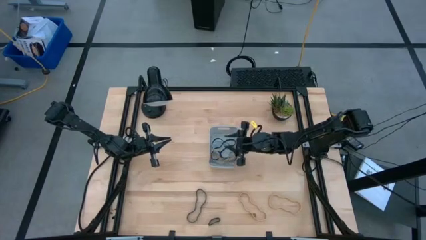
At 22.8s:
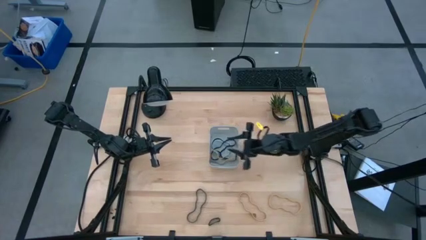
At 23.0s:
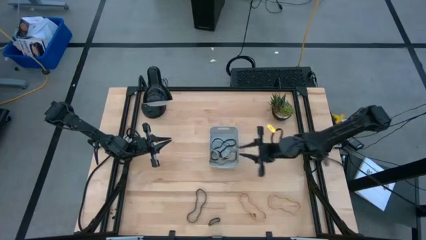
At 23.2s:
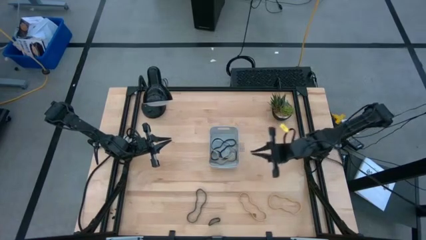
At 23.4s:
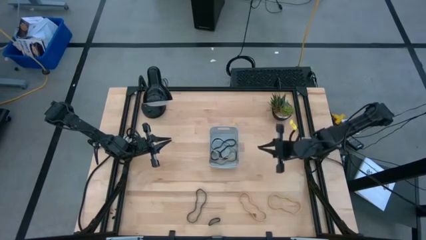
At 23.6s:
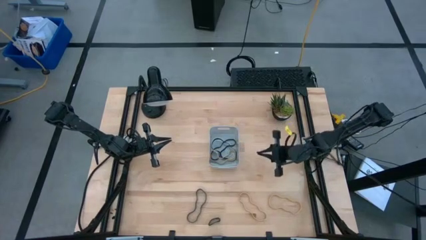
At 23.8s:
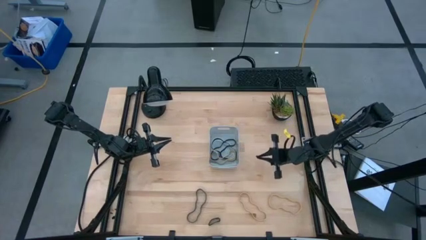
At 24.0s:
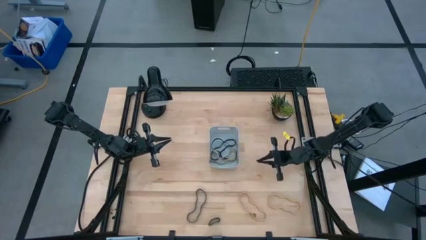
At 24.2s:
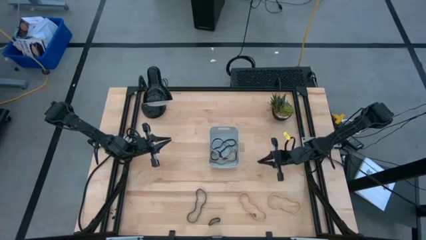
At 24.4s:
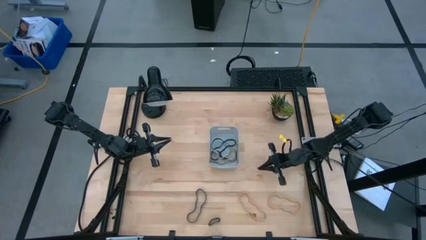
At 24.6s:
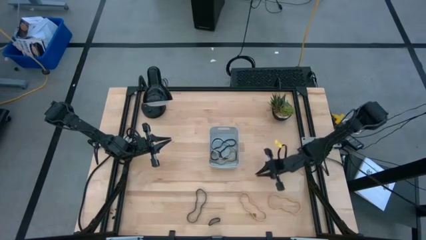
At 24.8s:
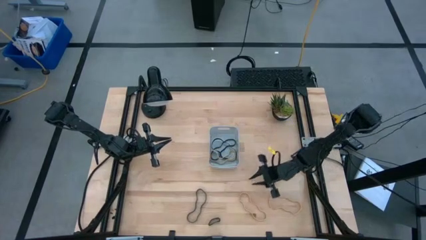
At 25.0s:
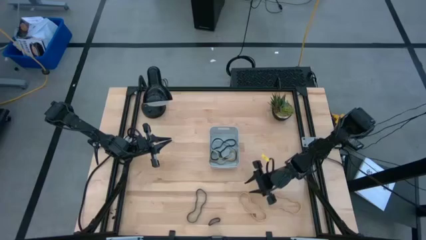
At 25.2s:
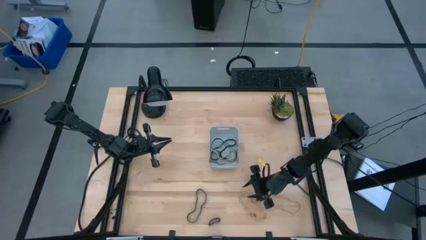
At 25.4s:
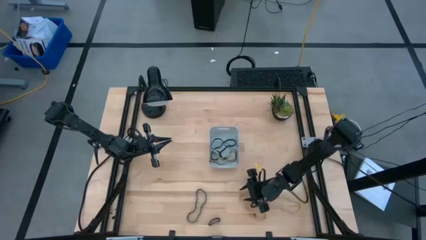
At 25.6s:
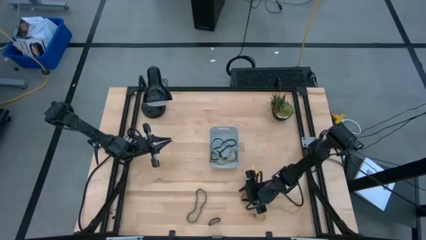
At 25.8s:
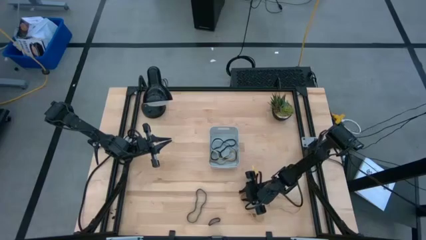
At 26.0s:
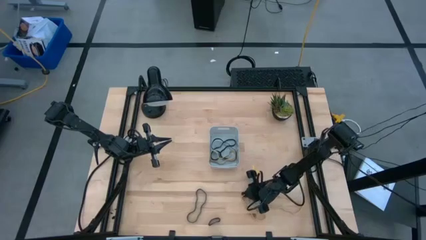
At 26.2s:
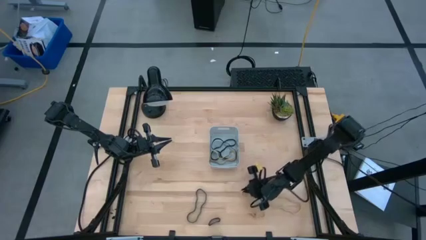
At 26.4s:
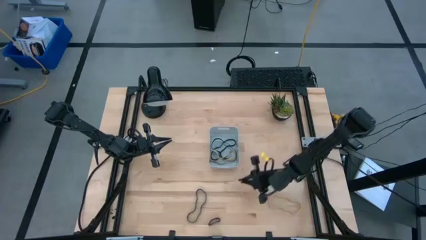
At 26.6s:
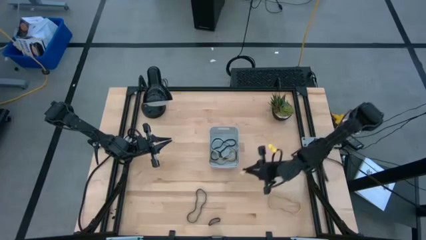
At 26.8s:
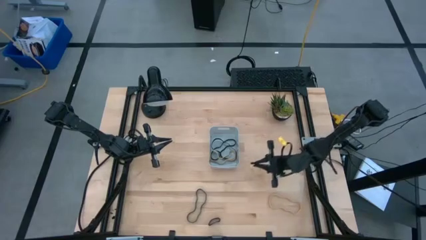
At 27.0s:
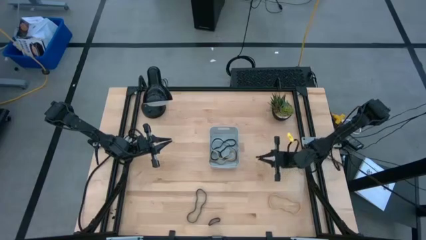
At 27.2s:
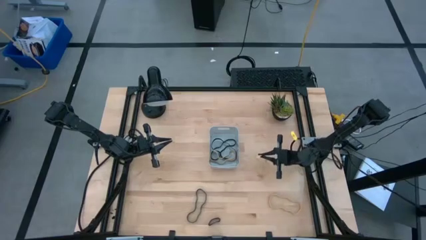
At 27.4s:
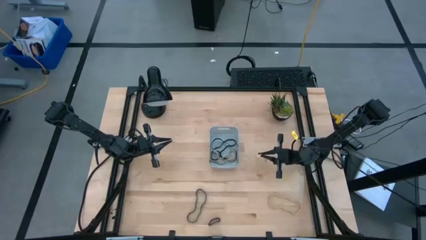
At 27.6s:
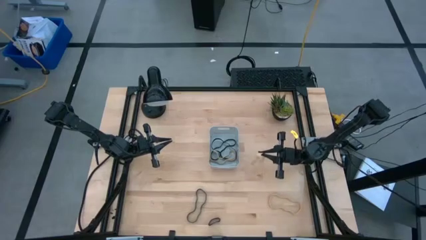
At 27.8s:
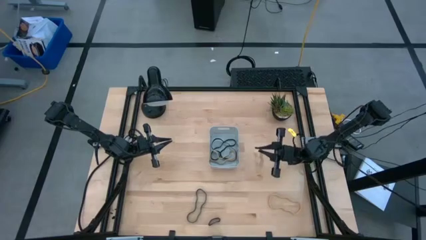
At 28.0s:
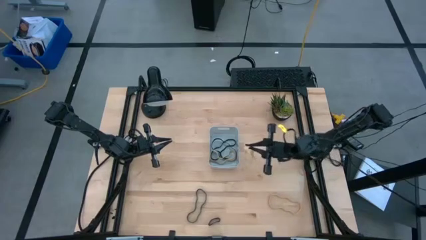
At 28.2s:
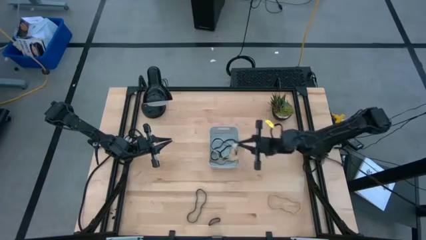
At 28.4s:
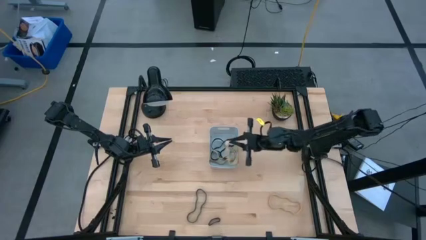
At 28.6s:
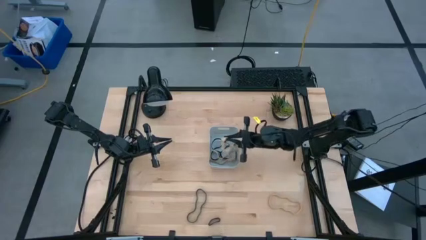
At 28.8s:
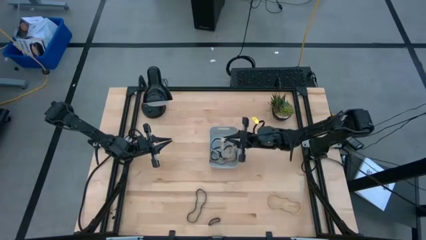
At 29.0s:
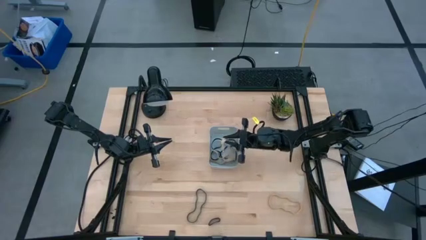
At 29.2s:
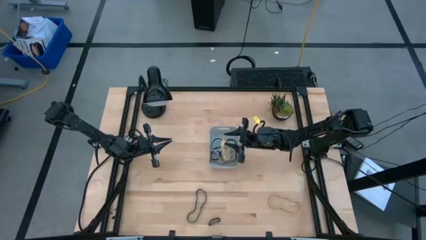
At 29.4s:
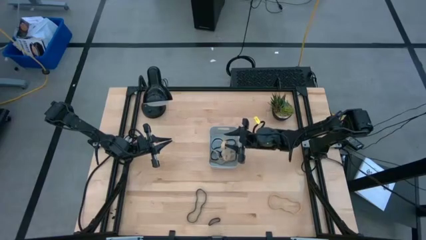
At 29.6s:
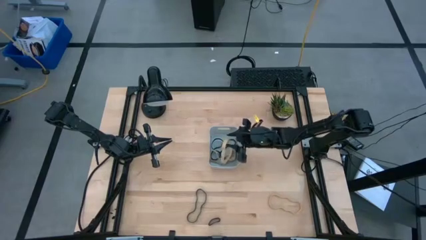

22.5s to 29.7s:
Task: Pick and place rubber bands into bin
Put the brown rubber band into the gray container

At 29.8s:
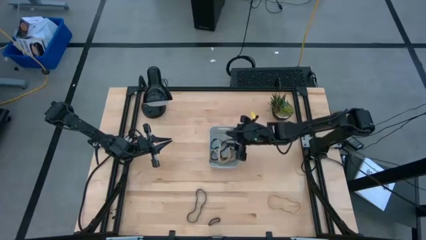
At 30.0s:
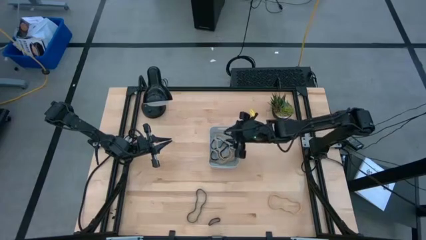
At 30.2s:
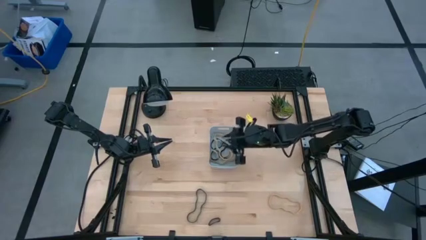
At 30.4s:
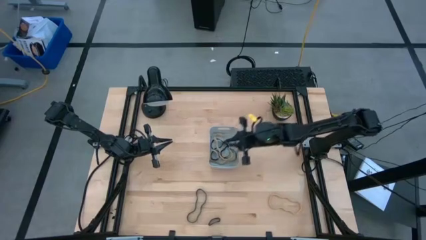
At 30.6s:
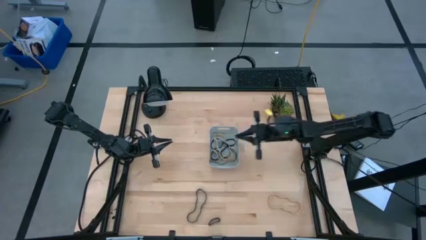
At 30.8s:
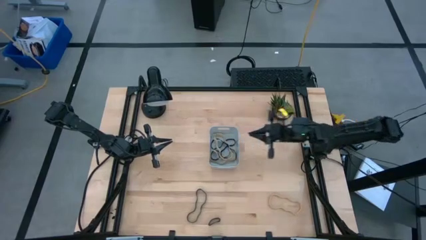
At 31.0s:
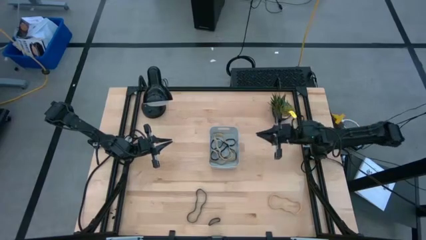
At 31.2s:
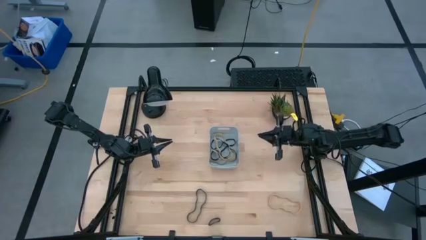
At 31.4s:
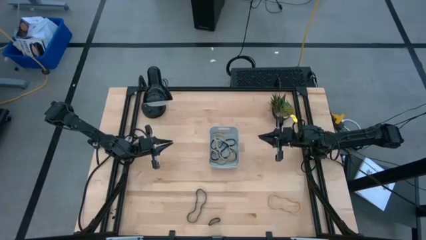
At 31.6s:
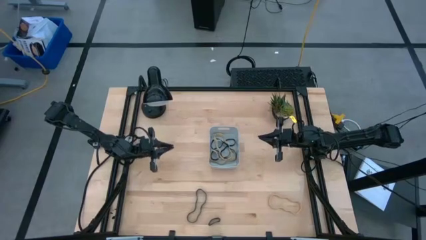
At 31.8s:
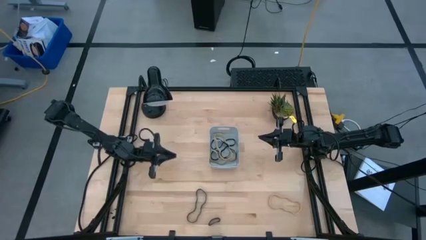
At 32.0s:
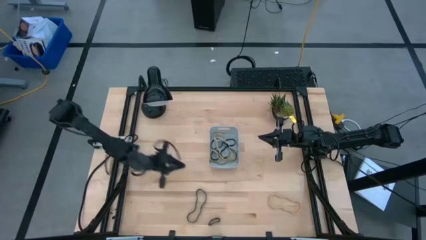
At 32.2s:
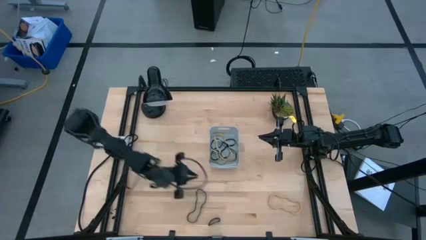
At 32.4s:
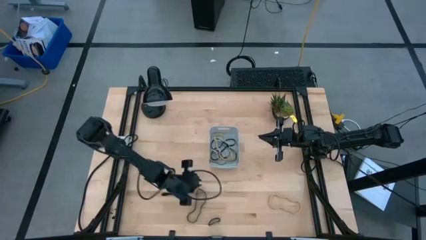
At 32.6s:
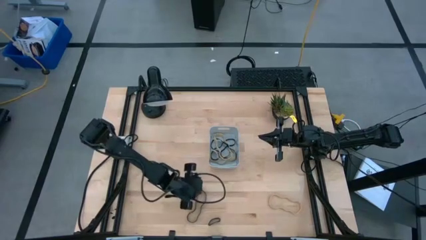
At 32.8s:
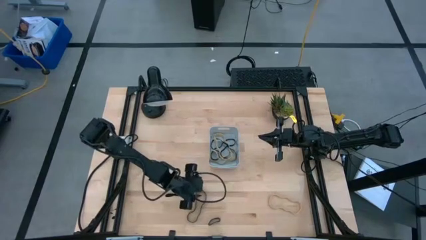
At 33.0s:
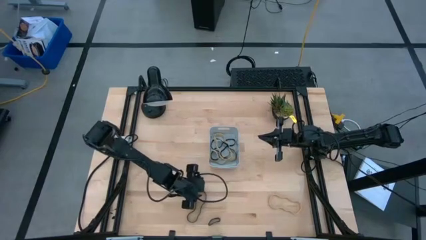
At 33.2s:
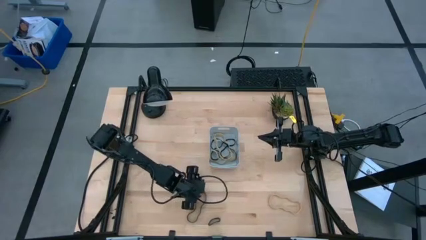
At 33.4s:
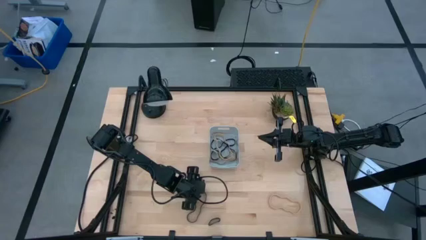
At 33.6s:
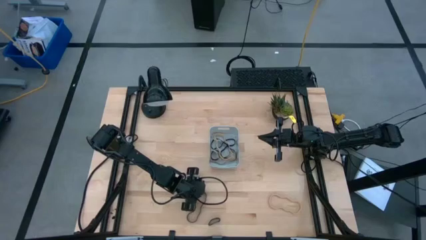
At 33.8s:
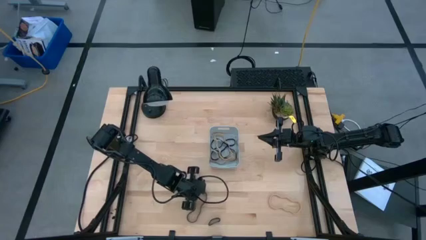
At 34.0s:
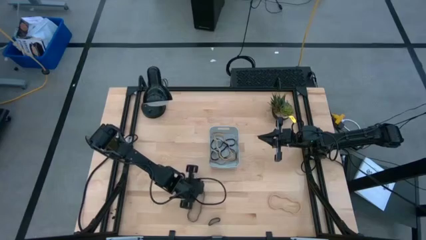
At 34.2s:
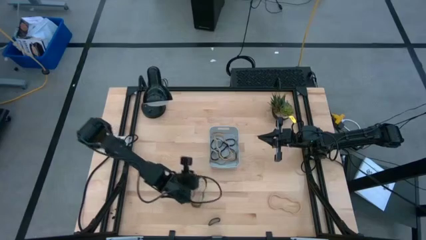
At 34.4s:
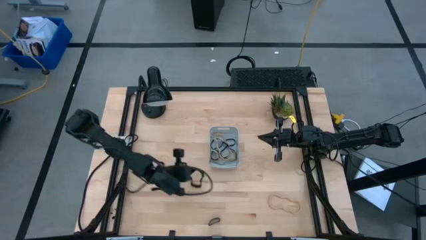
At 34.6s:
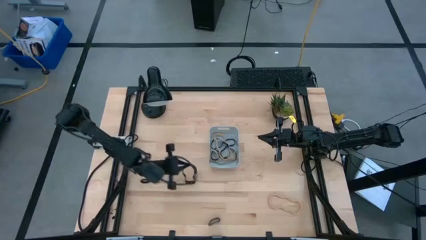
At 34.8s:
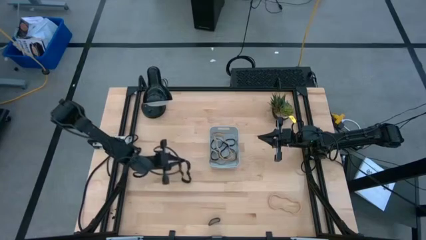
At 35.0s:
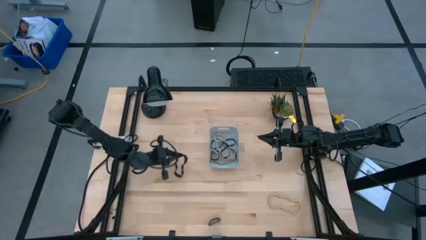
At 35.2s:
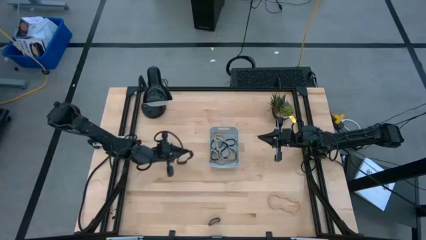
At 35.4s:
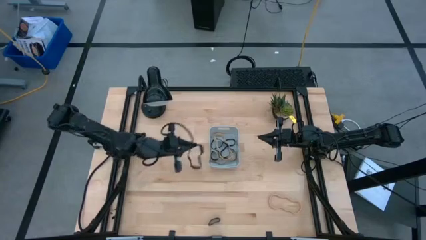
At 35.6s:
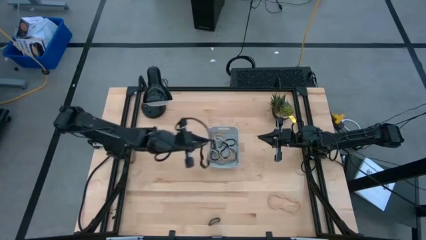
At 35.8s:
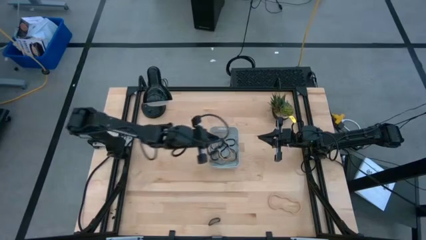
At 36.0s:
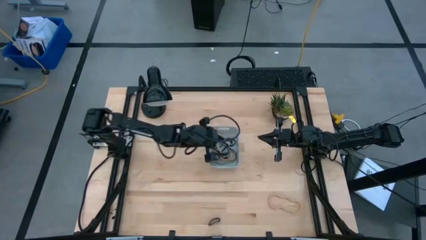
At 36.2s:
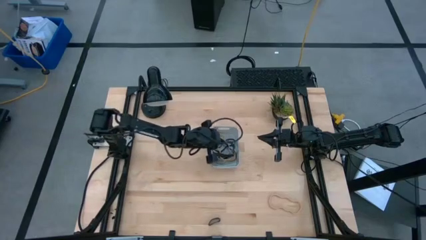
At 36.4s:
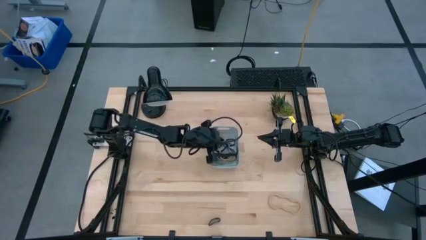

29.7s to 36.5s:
Put the black rubber band into the gray container

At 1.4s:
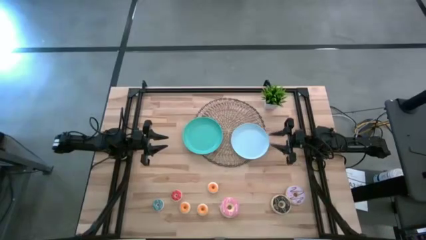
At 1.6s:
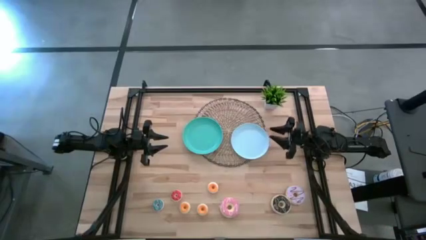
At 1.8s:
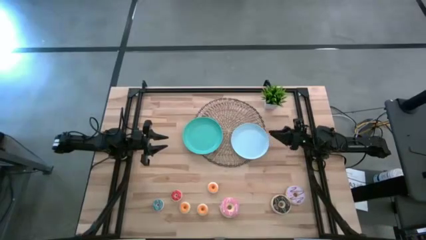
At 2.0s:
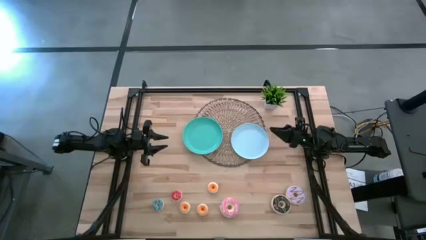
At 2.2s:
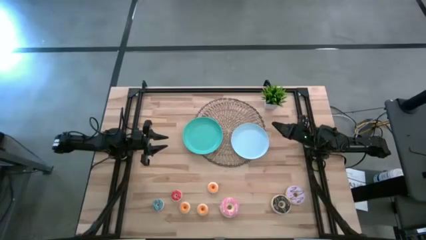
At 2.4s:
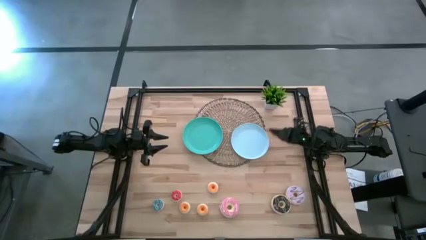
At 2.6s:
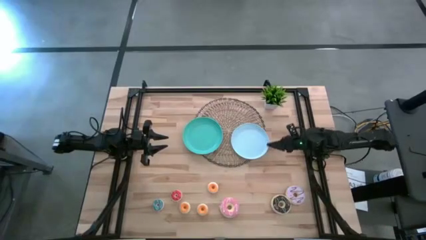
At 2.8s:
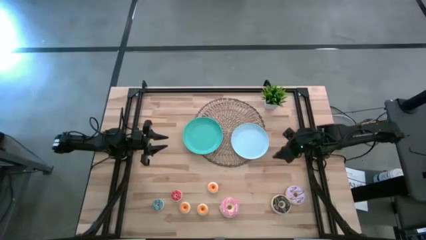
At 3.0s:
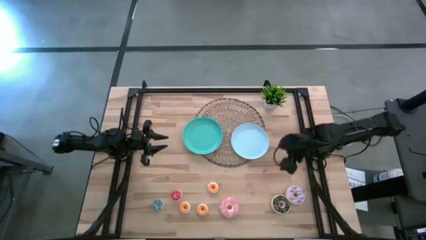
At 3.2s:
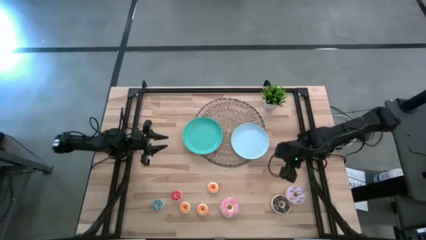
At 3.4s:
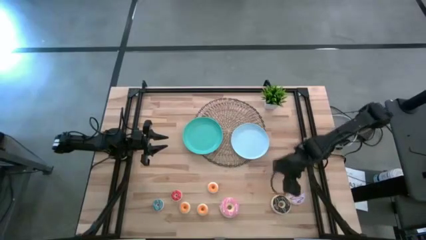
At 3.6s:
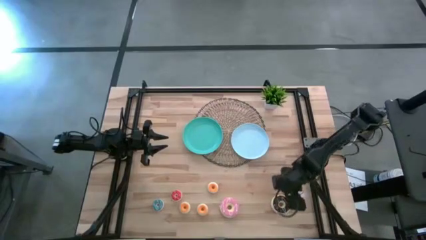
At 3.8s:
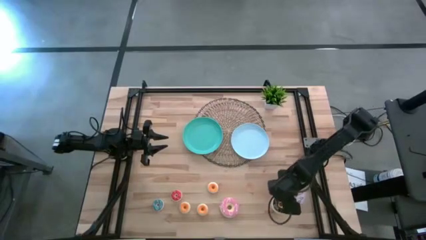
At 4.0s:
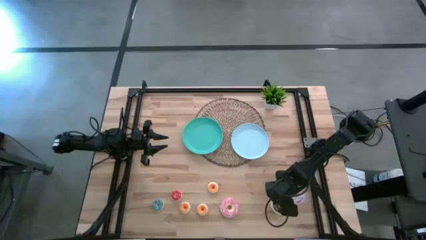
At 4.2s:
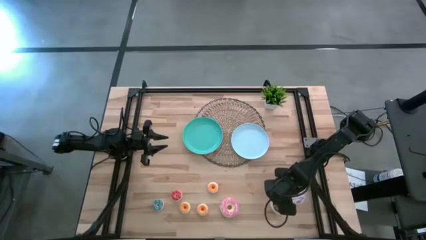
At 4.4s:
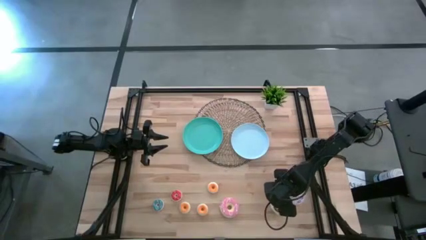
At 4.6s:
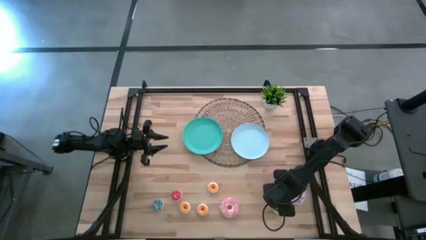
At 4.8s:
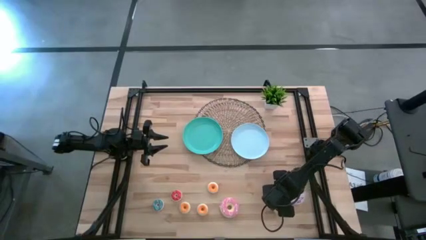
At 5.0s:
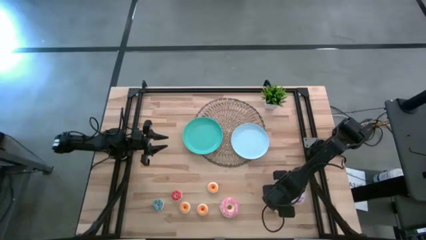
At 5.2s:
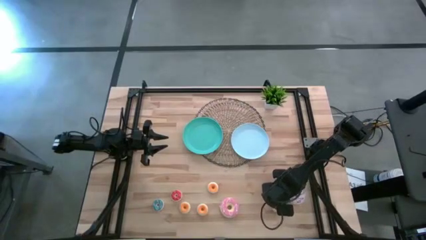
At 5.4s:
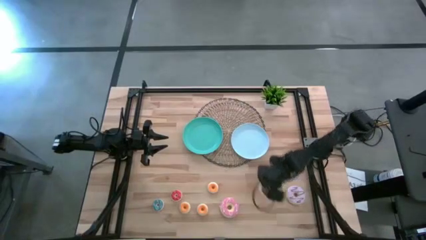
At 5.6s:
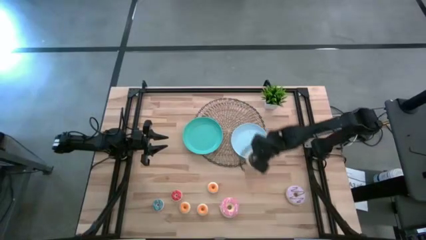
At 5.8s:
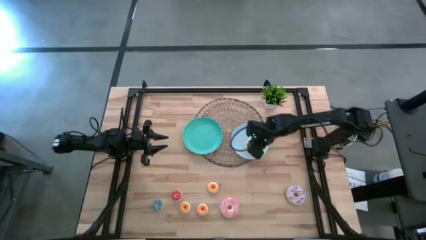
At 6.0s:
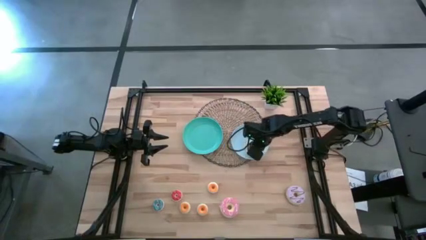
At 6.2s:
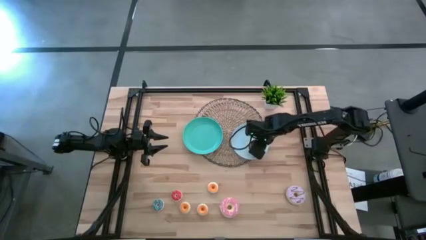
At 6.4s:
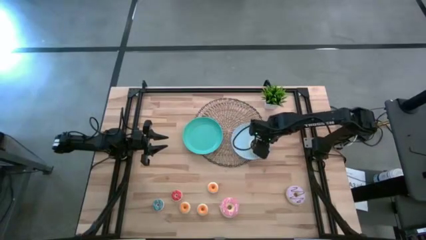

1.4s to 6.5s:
Task: Pick & Place donuts
Put the large black donut on the blue plate
